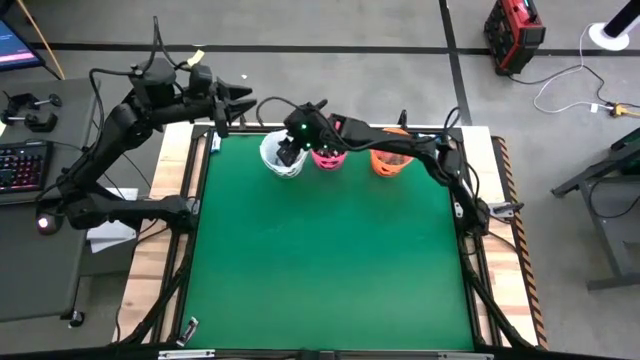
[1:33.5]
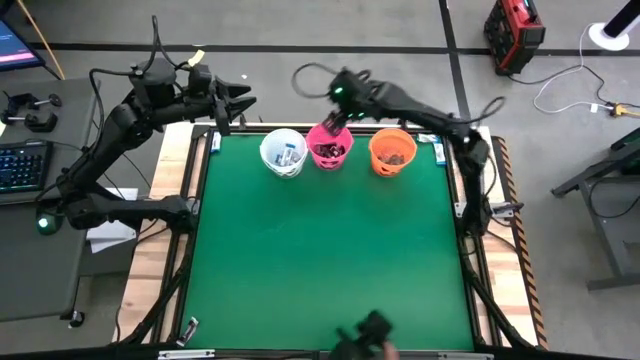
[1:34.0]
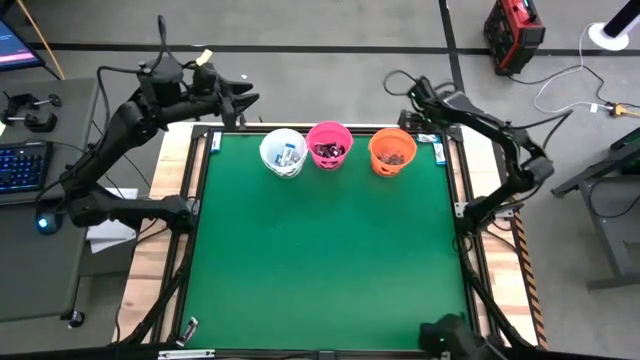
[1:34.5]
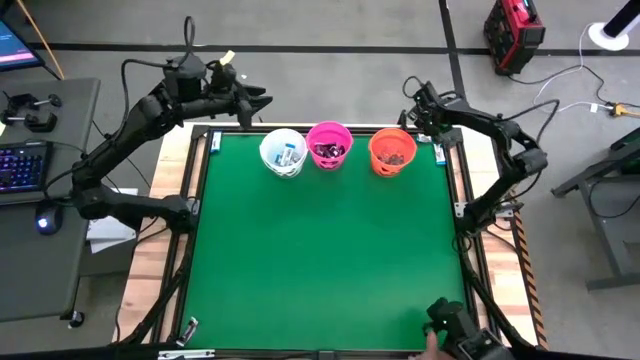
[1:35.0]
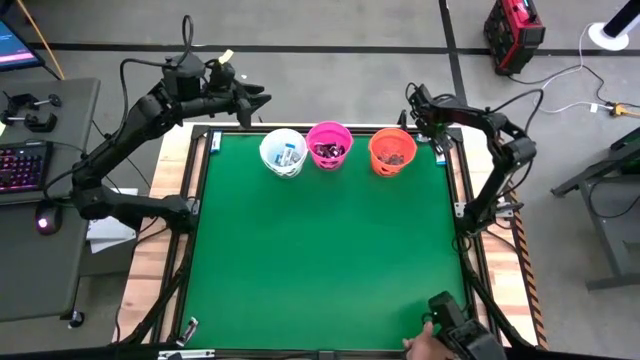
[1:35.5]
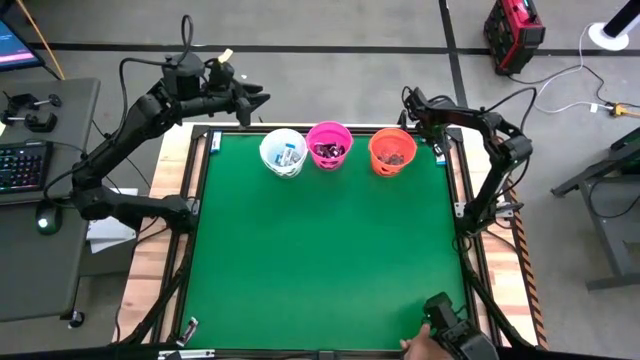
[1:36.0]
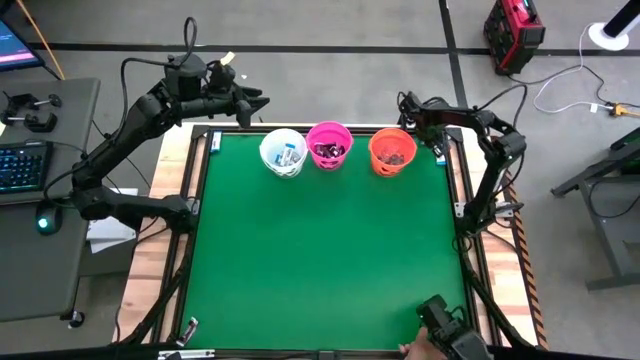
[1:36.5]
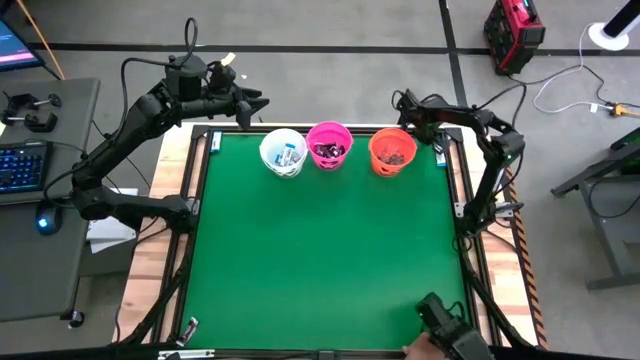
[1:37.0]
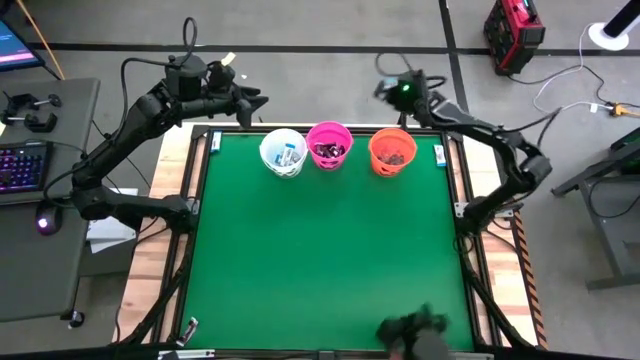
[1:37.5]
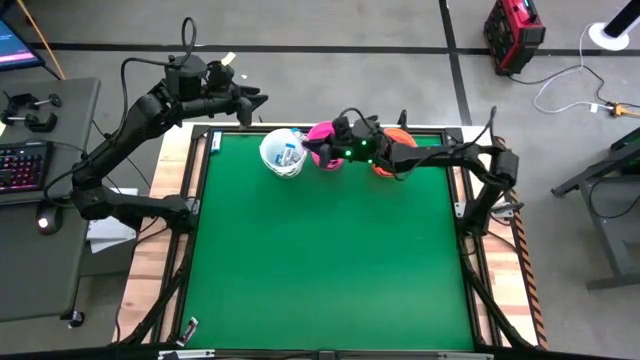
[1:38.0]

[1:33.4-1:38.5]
Task: Sort candy by brand, put in halloween buckets
Put the white chocolate into the white bucket

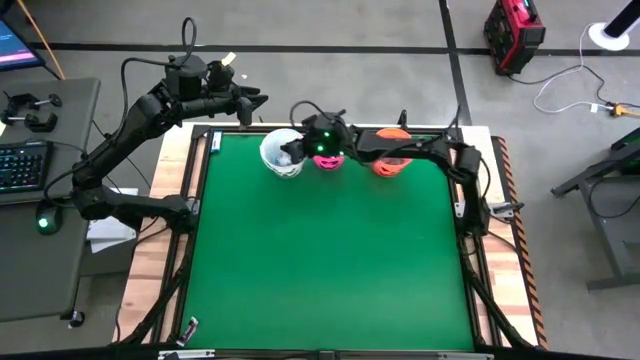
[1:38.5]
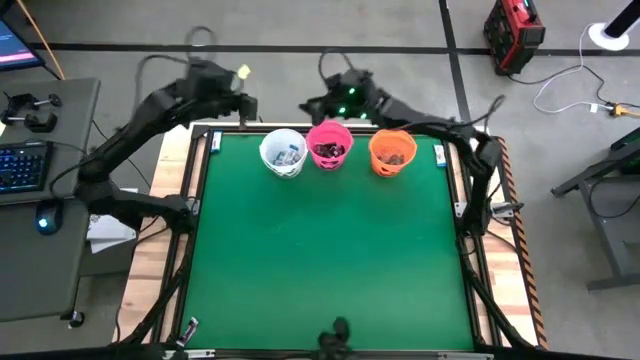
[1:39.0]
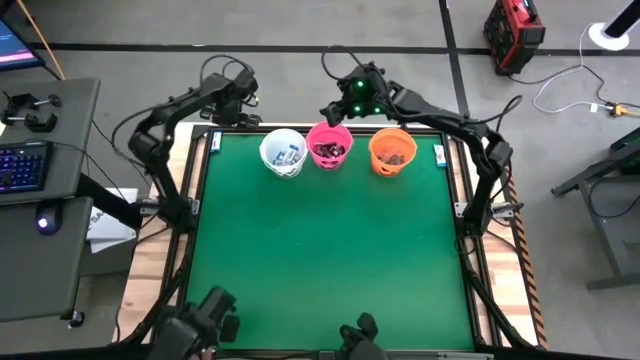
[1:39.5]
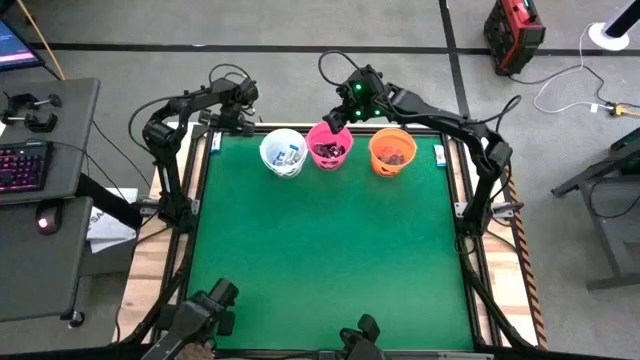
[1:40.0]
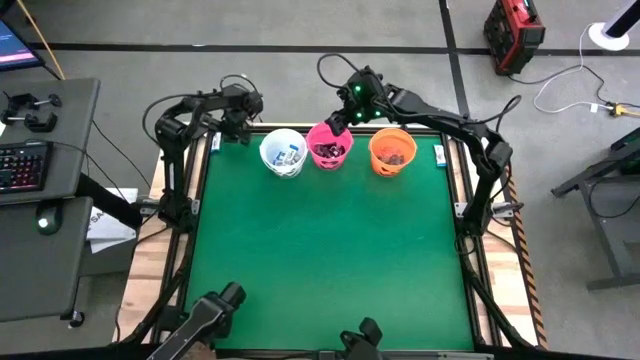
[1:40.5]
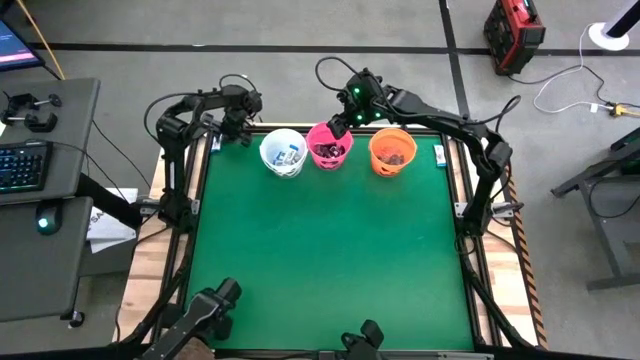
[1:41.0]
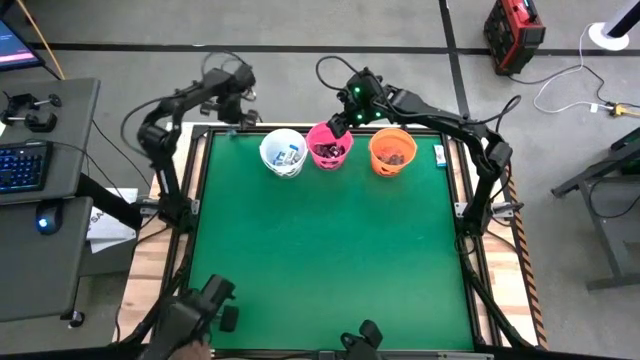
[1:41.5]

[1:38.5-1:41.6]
Put the white chocolate into the white bucket

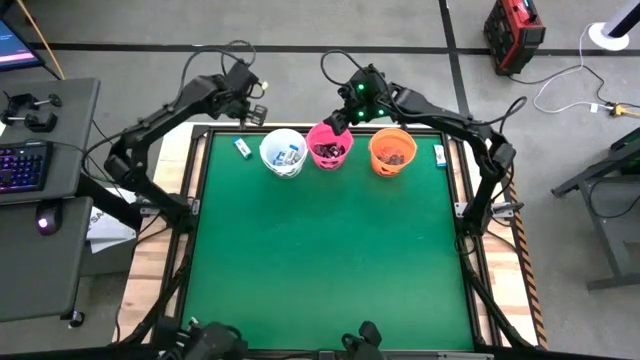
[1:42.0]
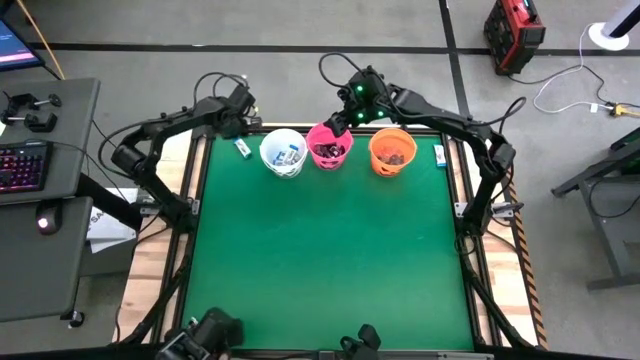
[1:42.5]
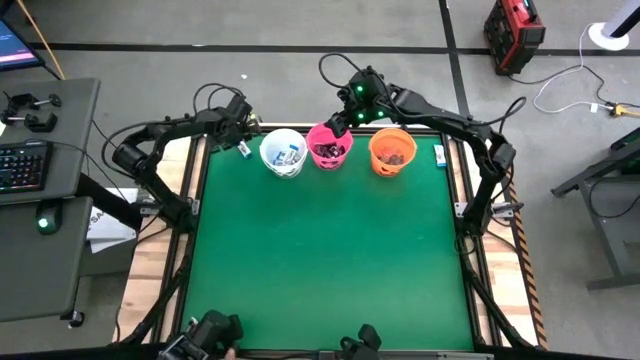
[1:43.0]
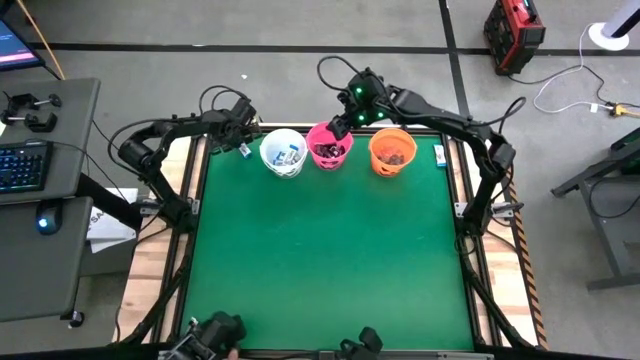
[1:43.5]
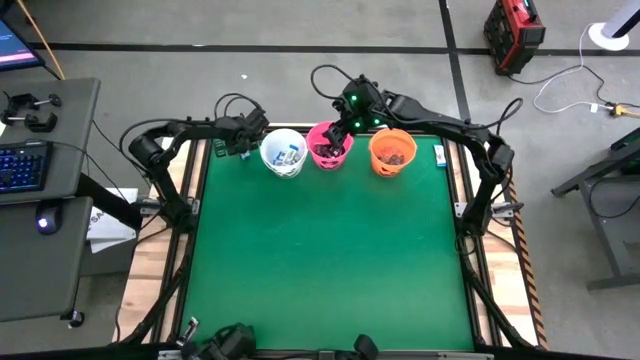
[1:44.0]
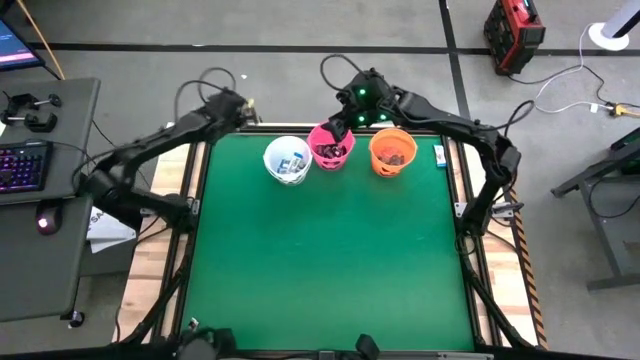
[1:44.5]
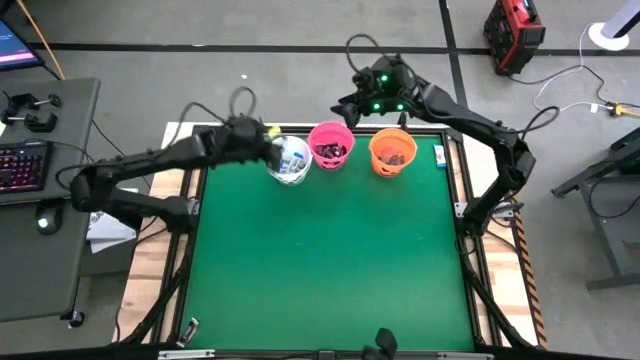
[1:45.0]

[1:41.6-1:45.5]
Put the white chocolate into the white bucket

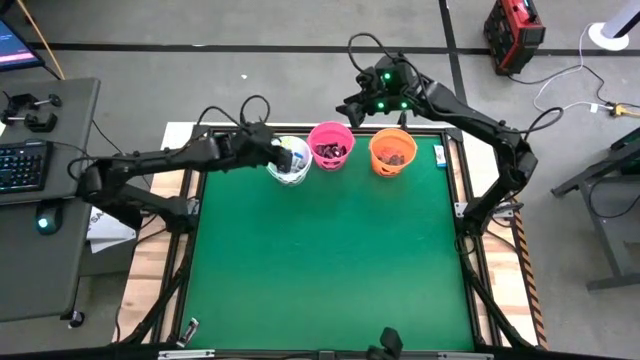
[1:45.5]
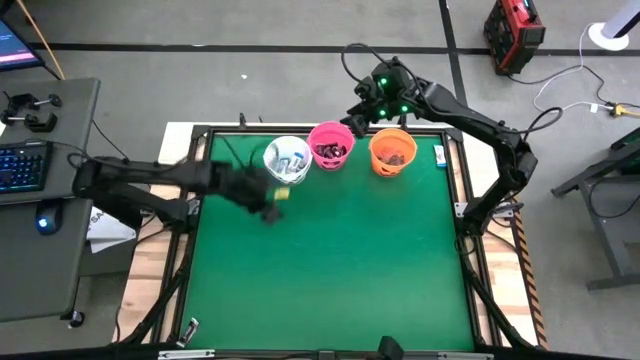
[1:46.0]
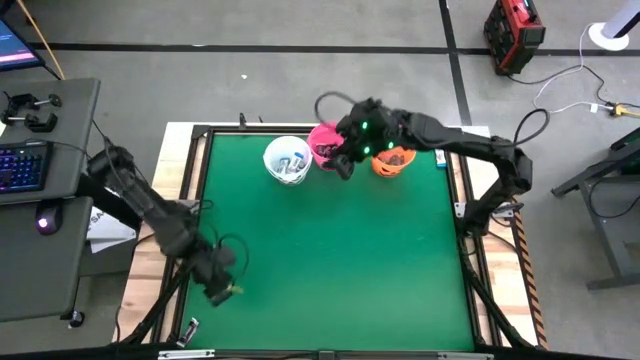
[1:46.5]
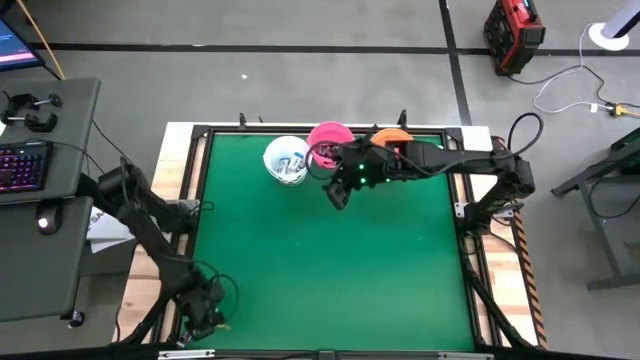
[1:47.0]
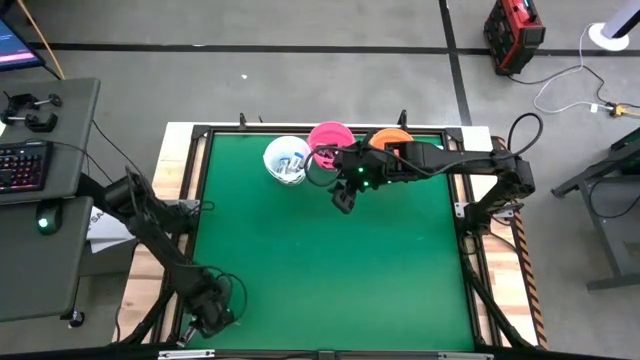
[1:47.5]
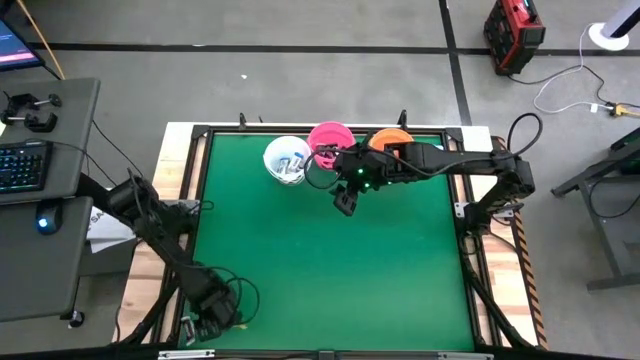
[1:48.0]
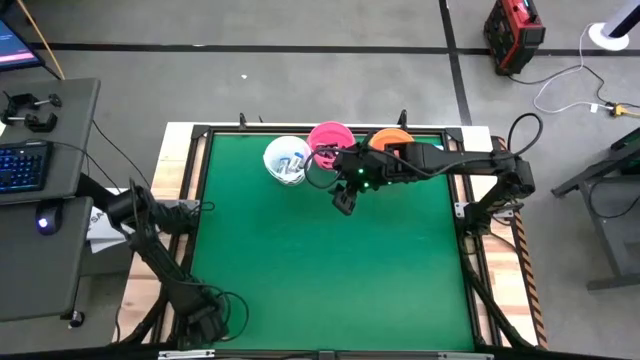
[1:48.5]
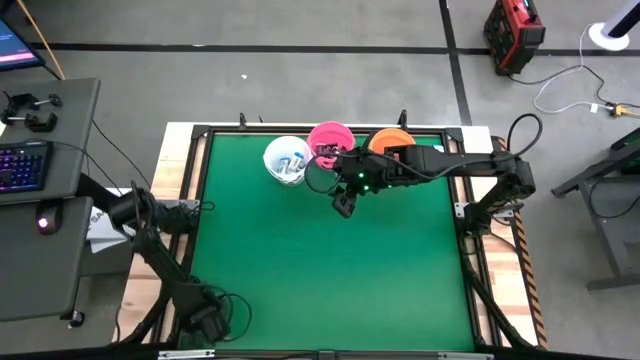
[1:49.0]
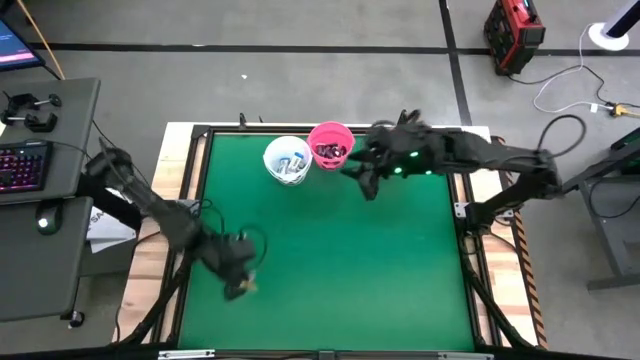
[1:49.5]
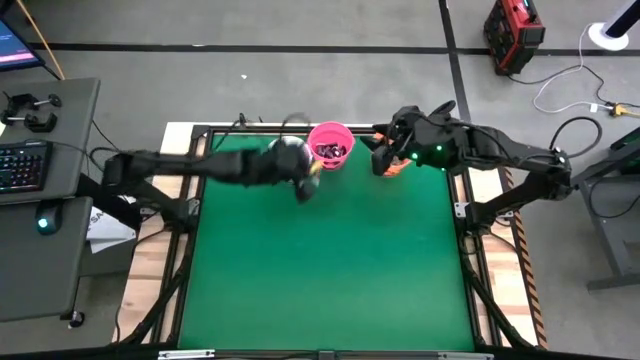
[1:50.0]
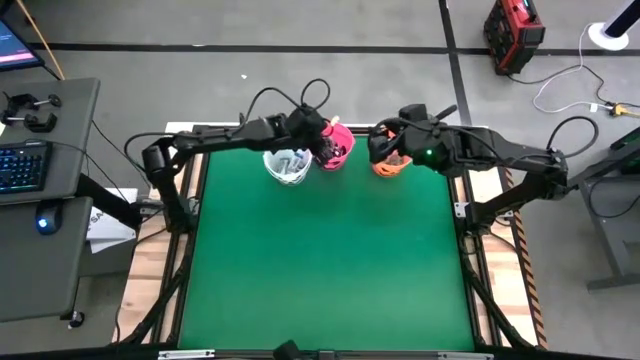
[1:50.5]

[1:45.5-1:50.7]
Put the brown chocolate into the pink bucket

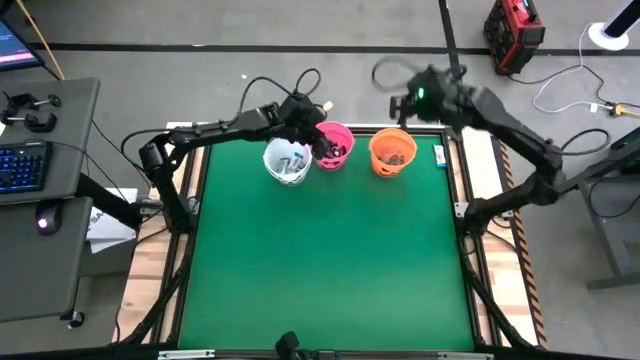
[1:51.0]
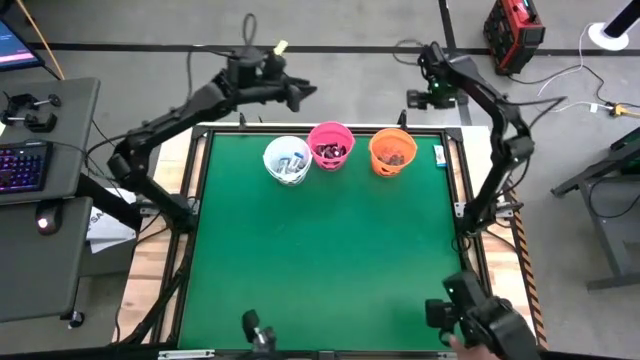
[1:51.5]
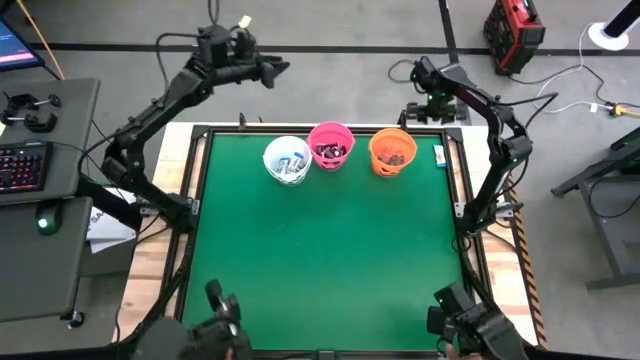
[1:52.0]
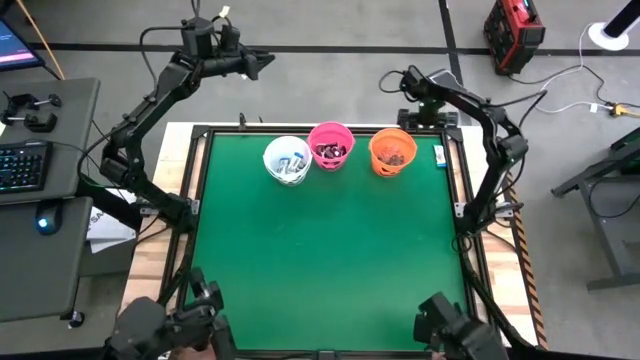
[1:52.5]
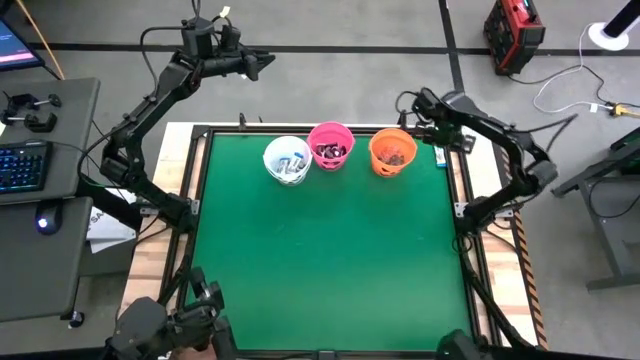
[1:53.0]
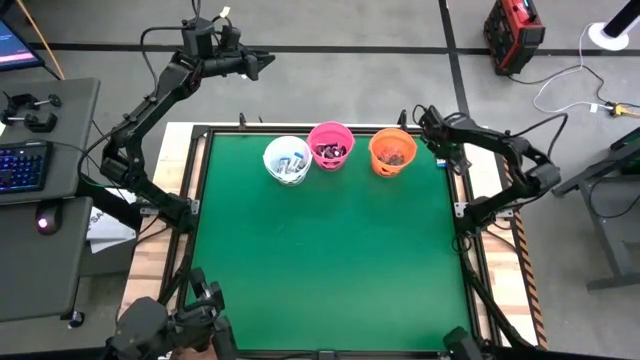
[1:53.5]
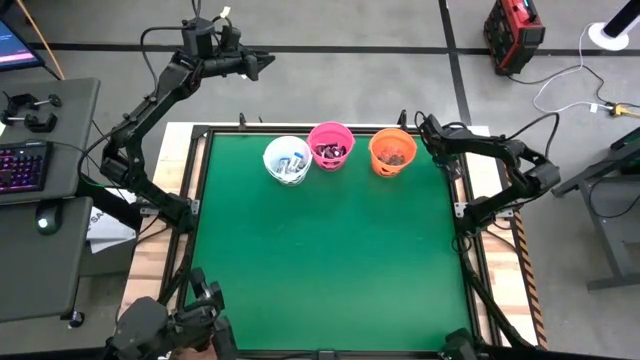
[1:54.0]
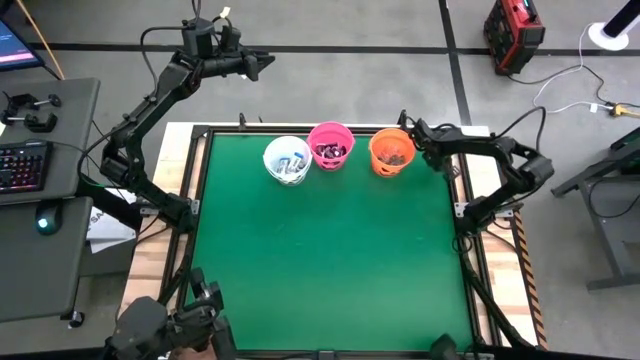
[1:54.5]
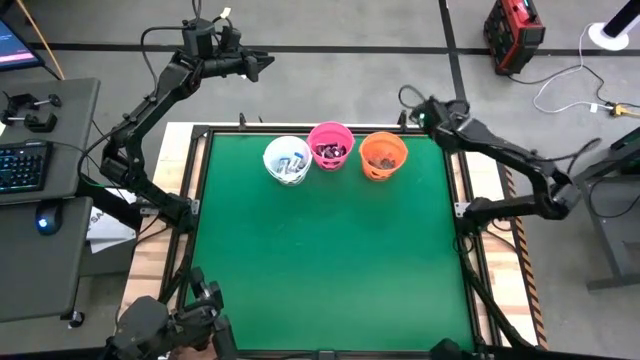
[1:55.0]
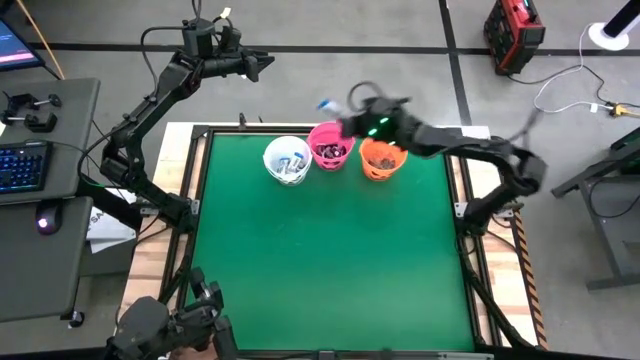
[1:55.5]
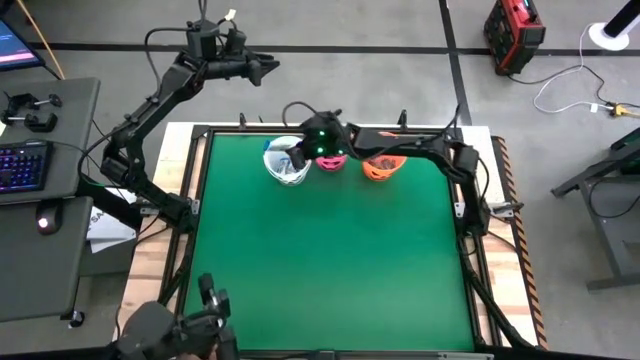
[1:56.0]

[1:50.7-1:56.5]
Put the white chocolate into the white bucket
